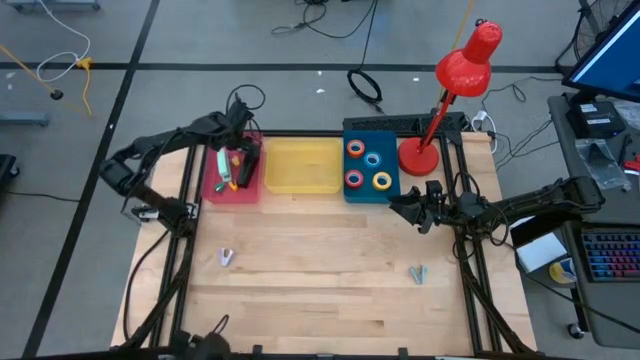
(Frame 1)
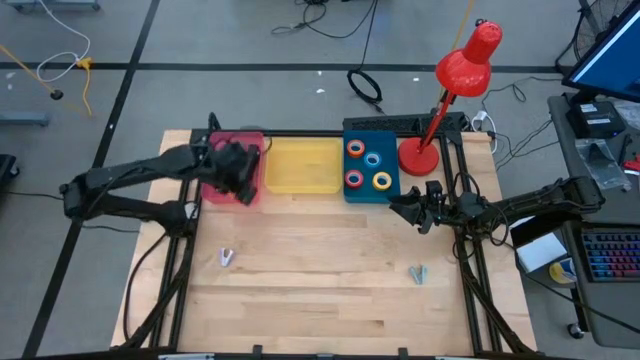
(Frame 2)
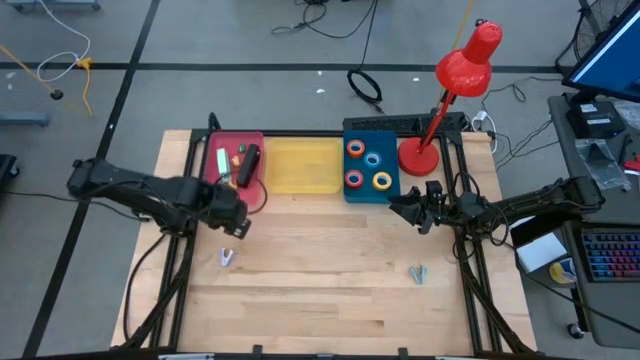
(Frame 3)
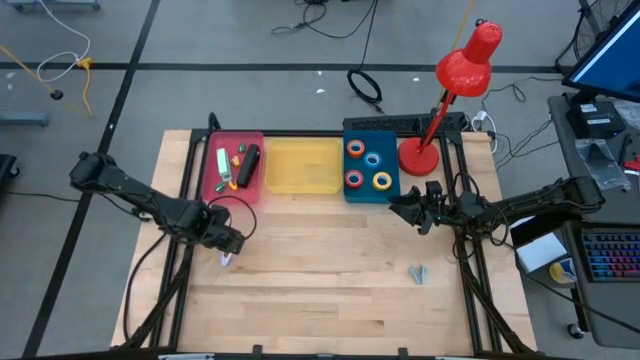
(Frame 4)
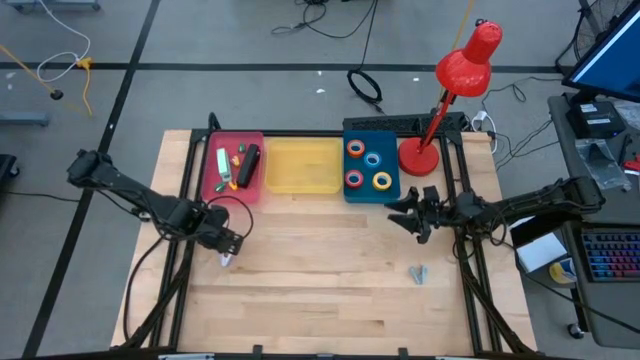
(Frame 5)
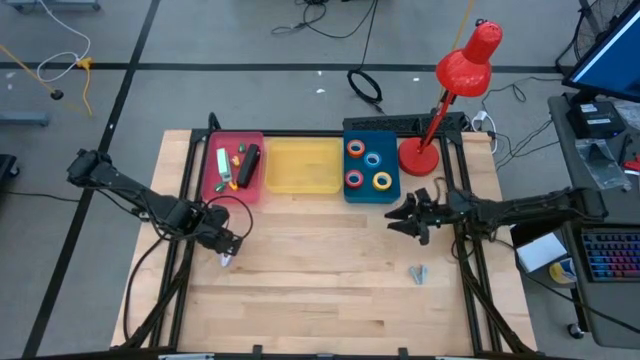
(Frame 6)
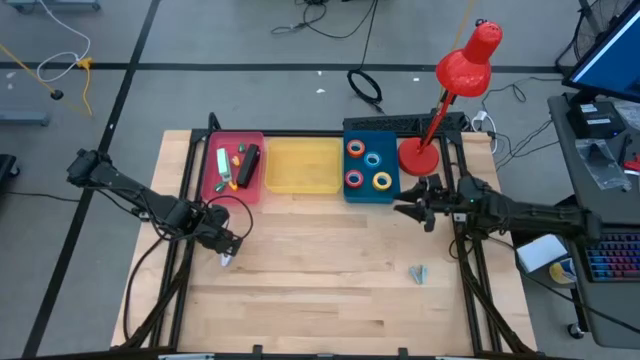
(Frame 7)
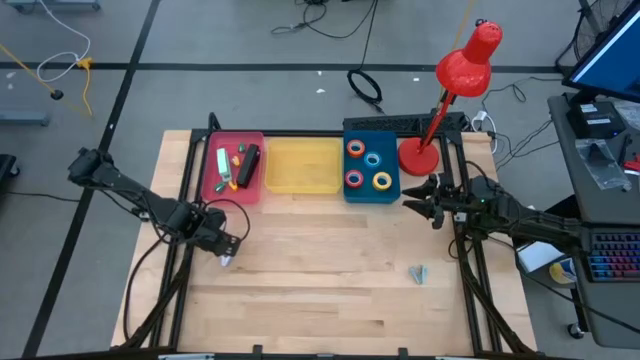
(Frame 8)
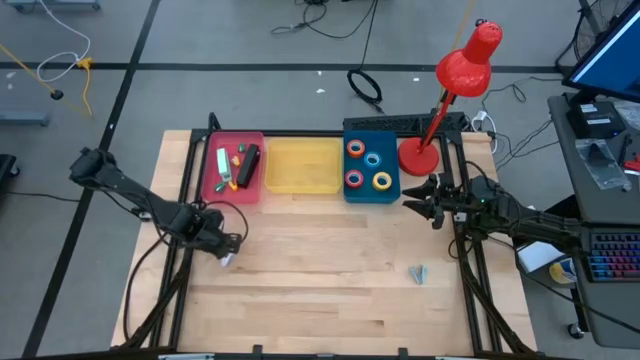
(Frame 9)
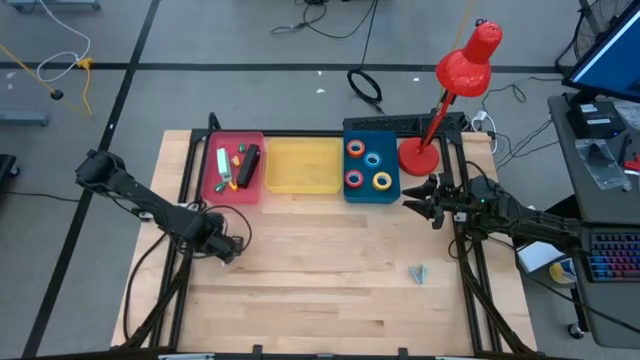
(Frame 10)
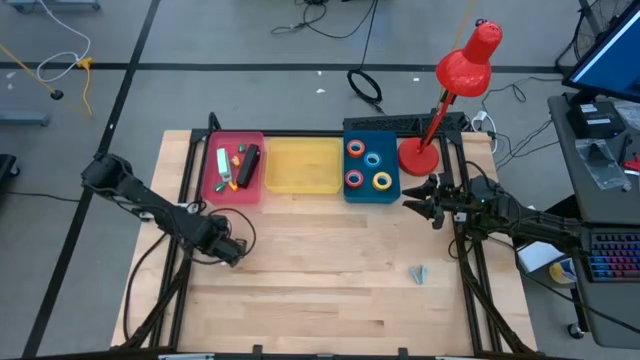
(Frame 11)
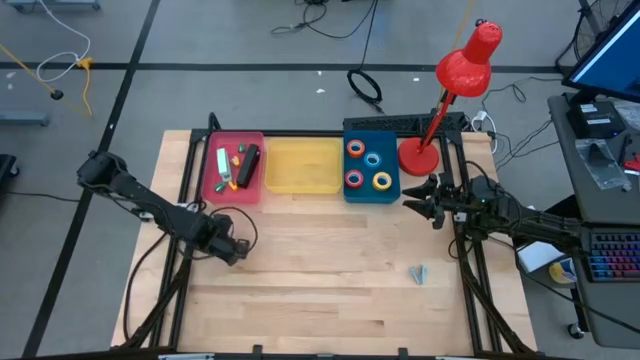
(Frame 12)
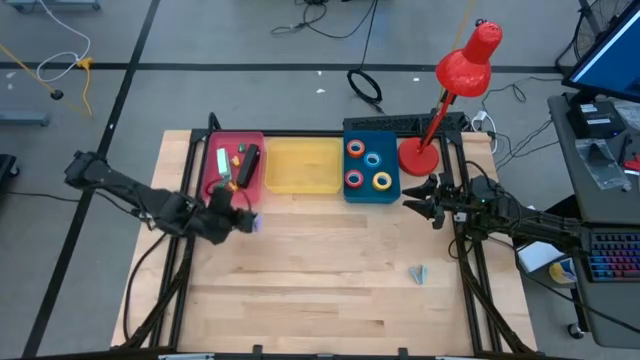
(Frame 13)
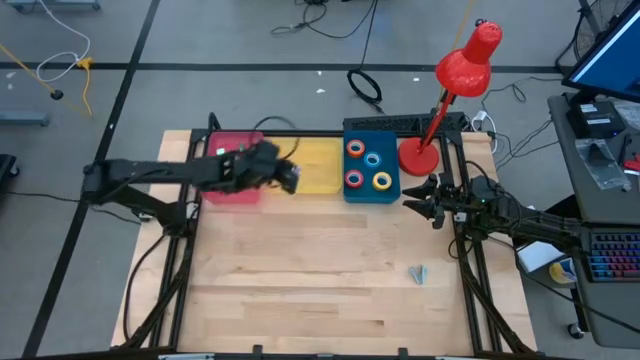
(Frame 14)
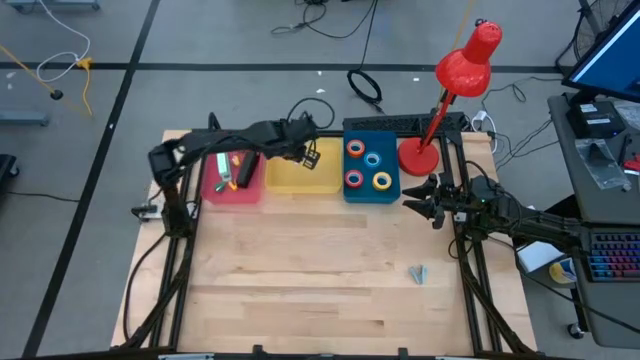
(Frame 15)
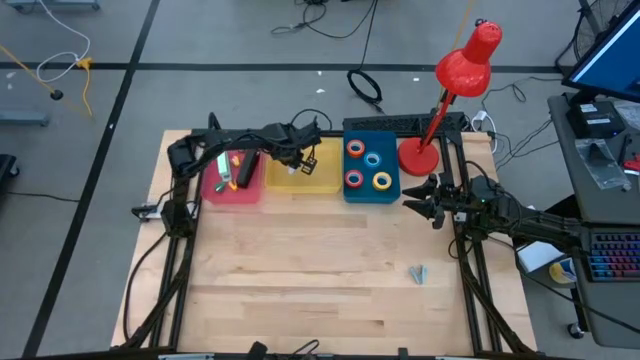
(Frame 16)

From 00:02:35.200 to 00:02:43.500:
Task: Pick and place Stapler, Stapler remover, tape
Put the purple stapler remover into the yellow bin

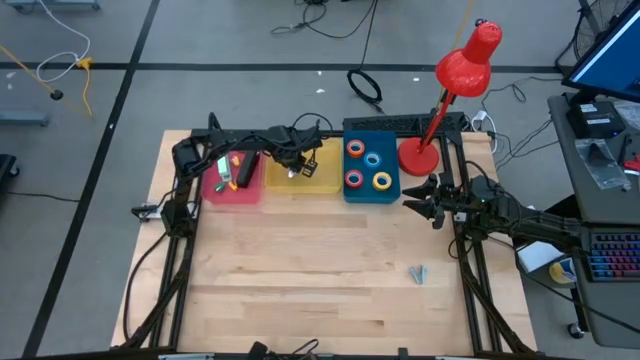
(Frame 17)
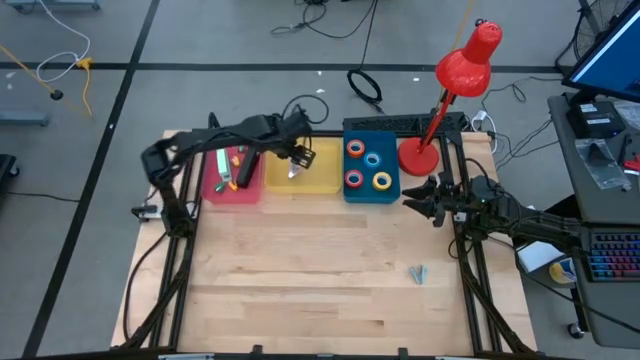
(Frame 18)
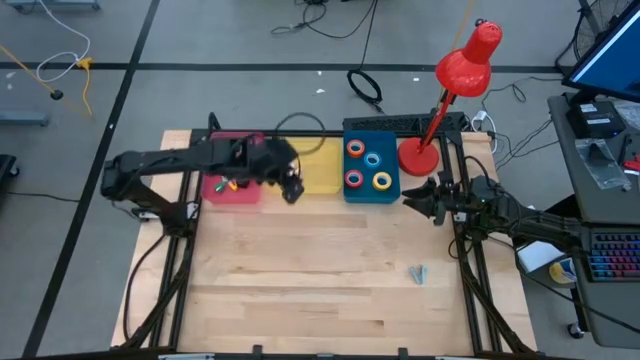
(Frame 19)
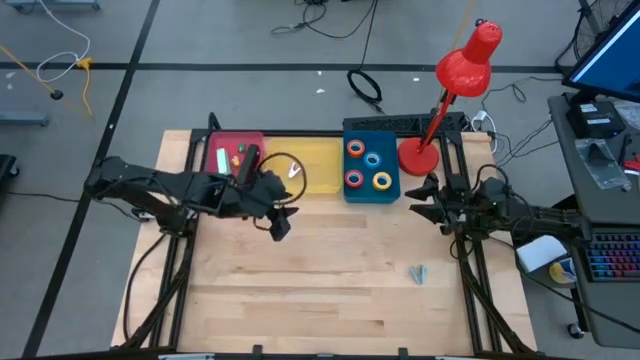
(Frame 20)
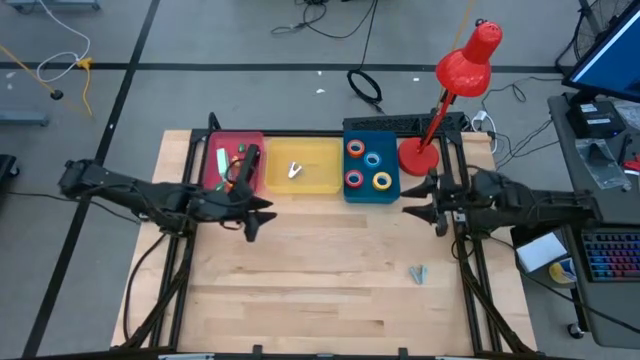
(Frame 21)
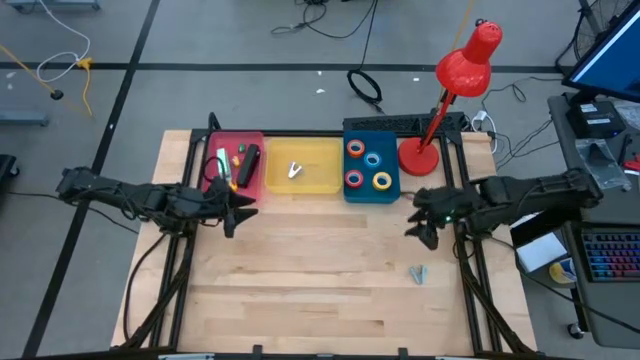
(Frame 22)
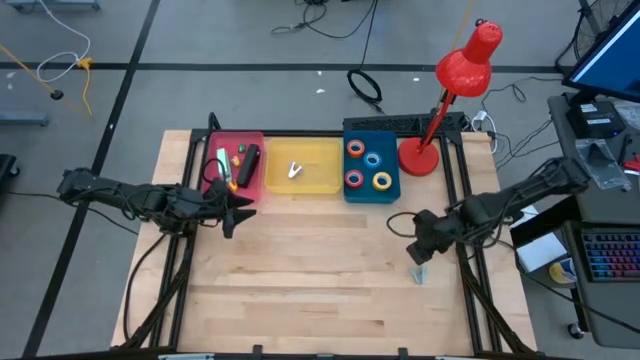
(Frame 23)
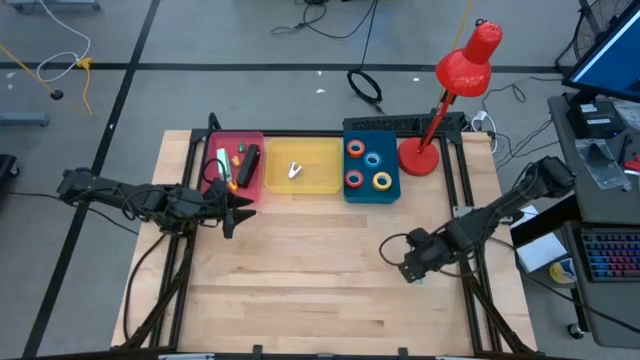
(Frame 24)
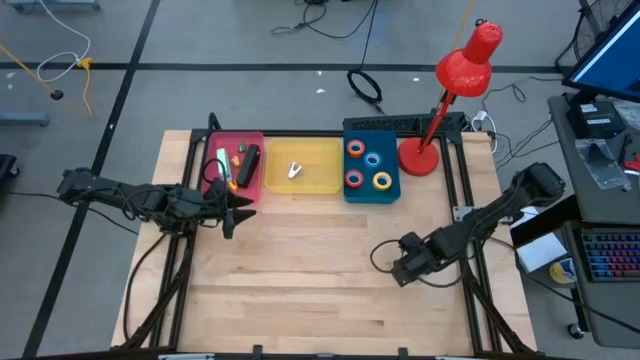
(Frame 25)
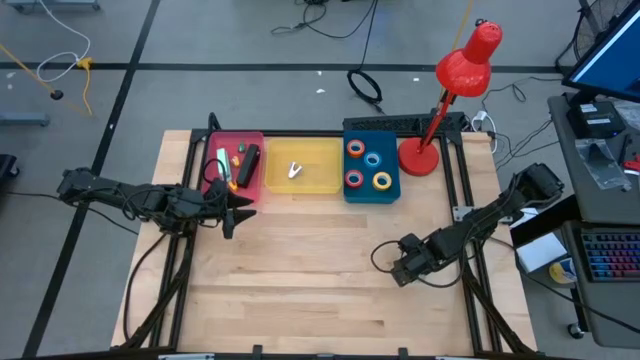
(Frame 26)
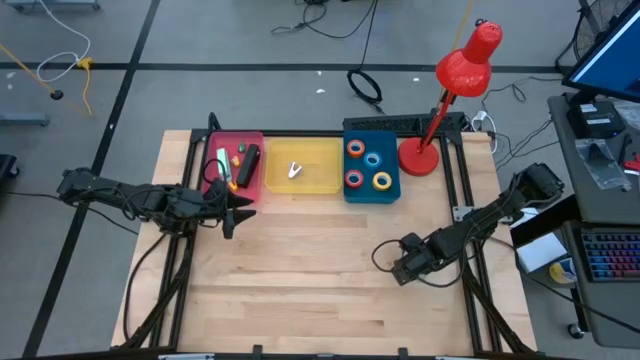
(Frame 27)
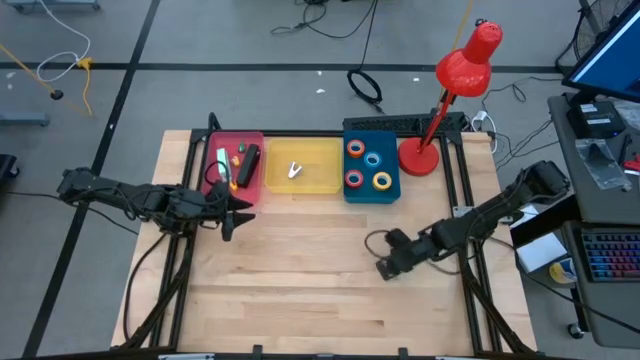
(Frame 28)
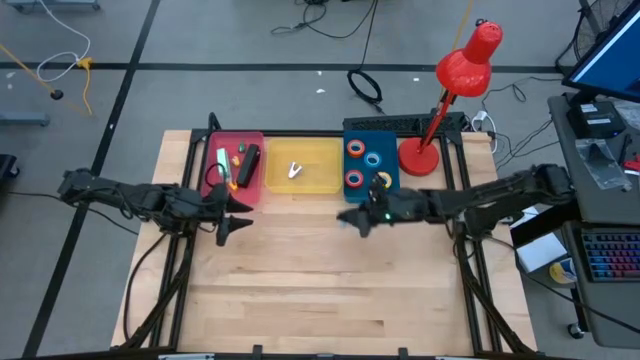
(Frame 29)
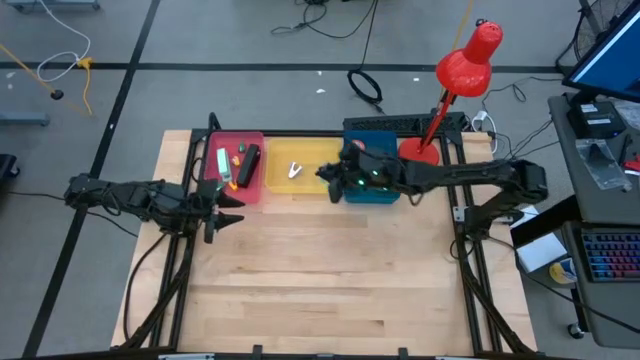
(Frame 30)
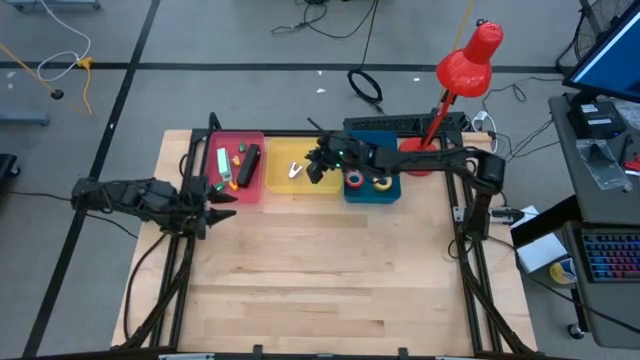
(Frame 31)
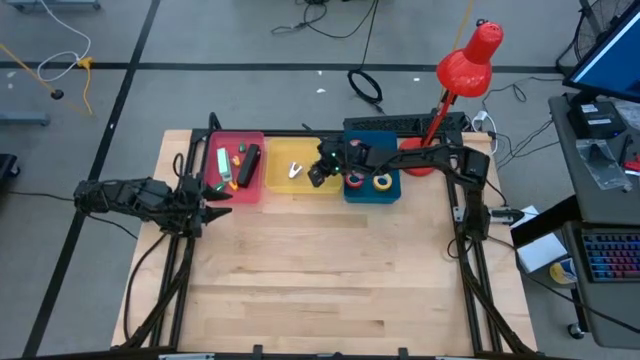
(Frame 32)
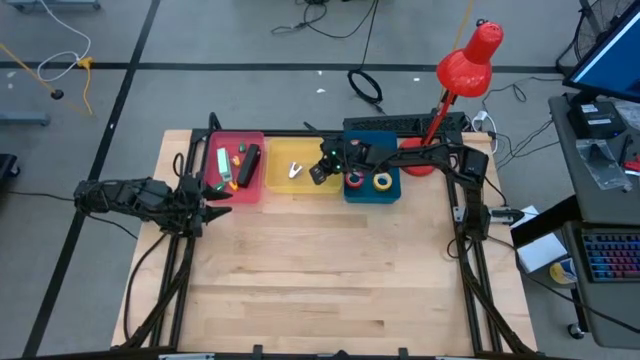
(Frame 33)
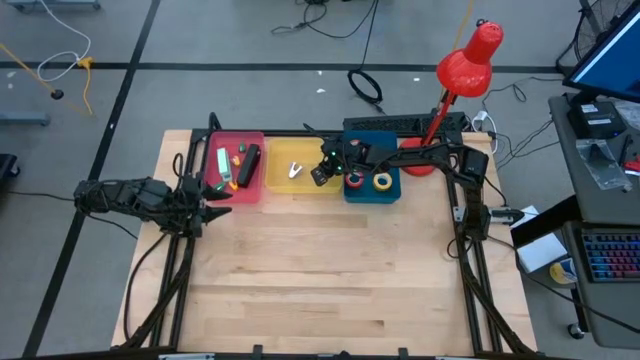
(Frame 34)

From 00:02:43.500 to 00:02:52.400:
Put the light blue stapler remover into the yellow bin

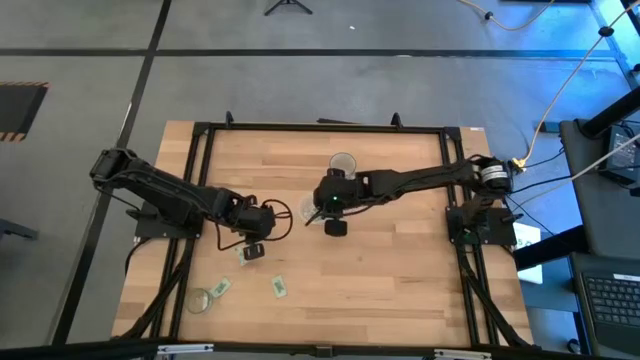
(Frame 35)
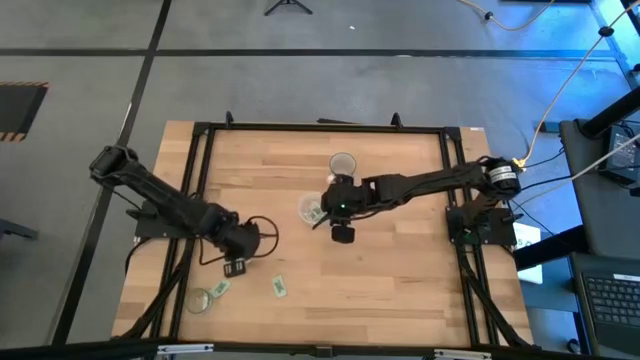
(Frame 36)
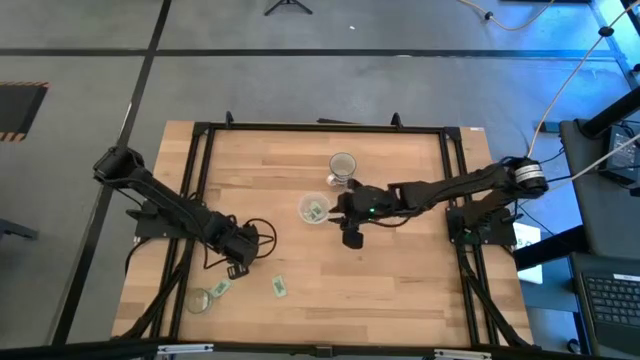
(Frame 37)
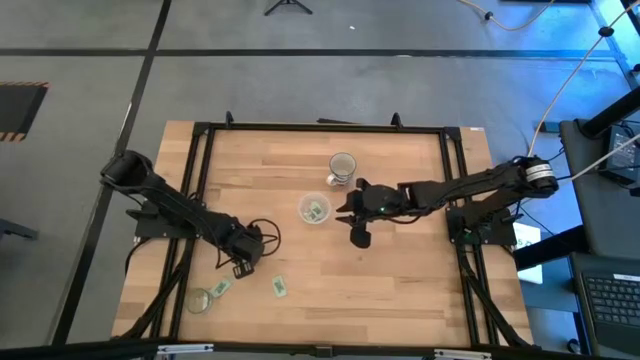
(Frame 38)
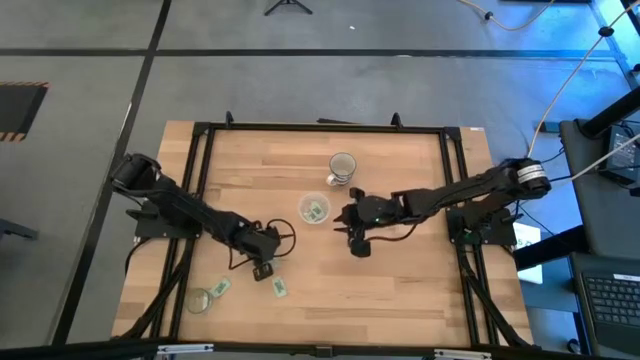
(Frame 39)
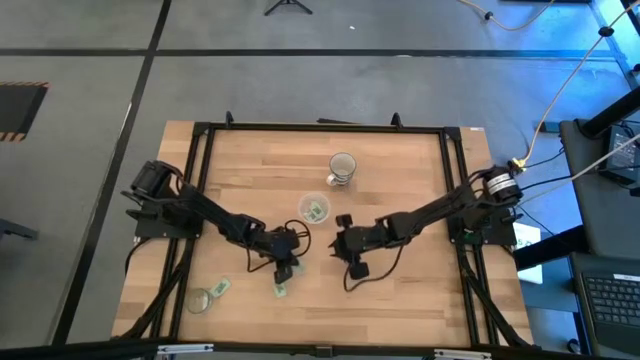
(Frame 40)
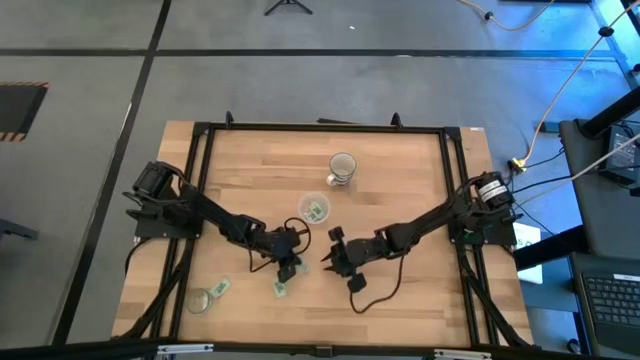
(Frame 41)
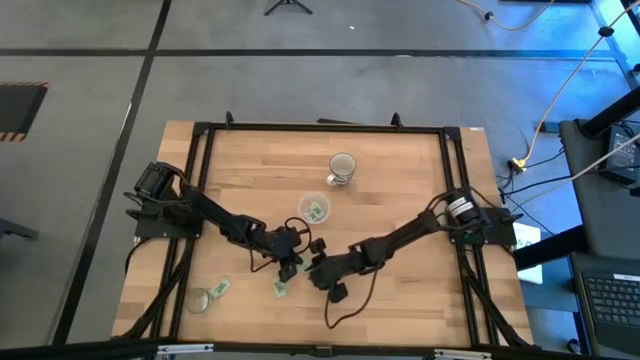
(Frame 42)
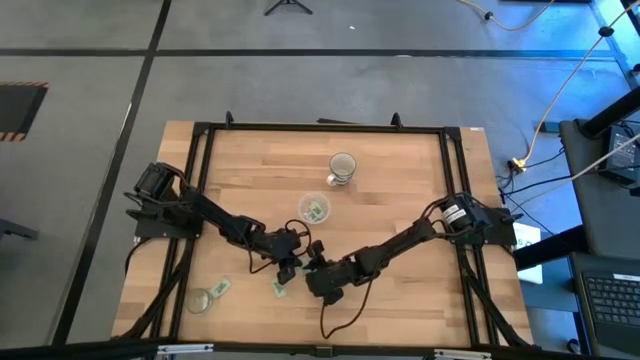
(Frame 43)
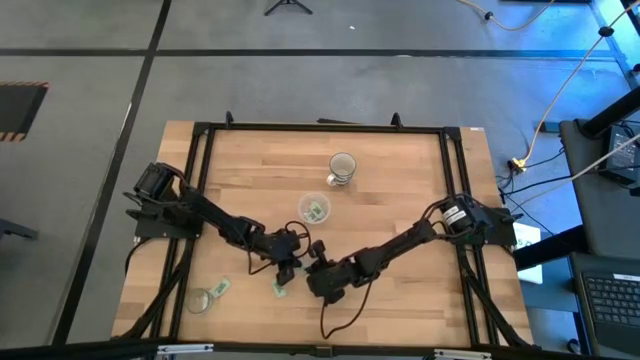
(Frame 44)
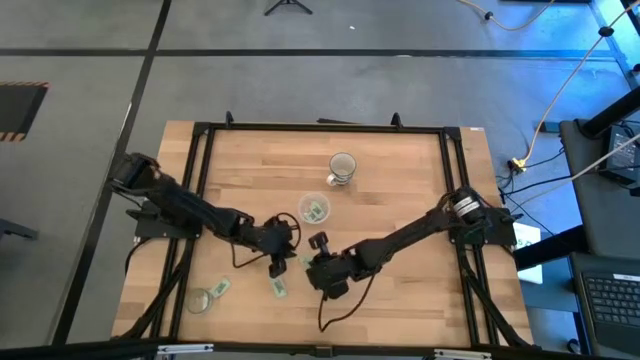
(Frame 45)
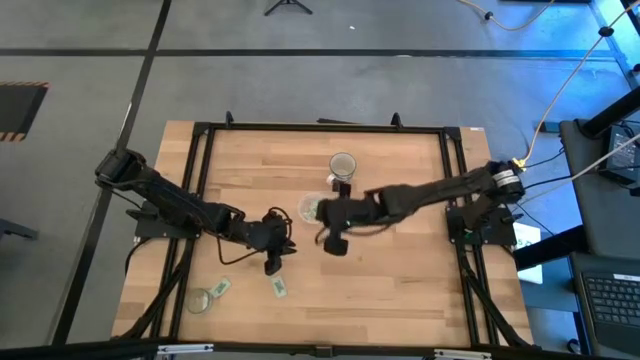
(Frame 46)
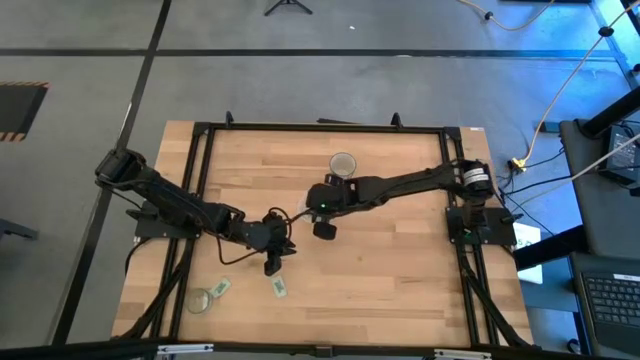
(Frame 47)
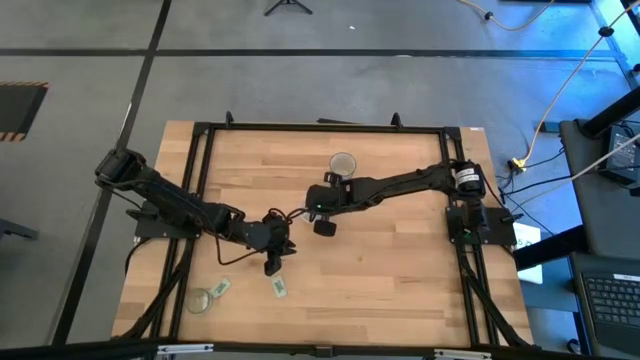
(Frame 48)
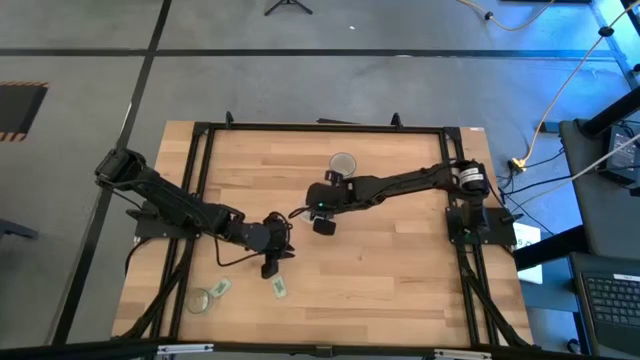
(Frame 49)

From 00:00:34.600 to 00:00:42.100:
Task: Pick and place Stevia / Truvia into bins
Put the stevia packet into the transparent container
